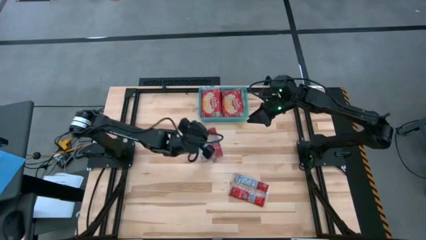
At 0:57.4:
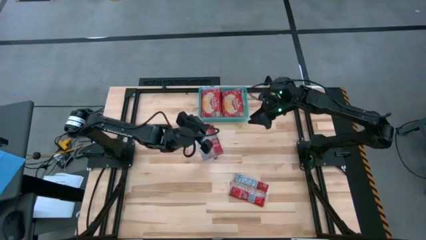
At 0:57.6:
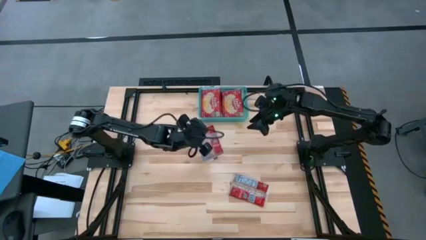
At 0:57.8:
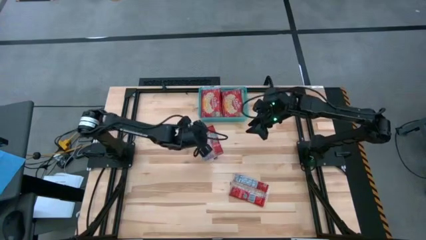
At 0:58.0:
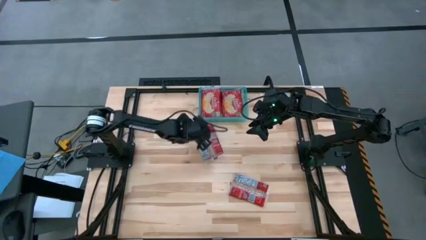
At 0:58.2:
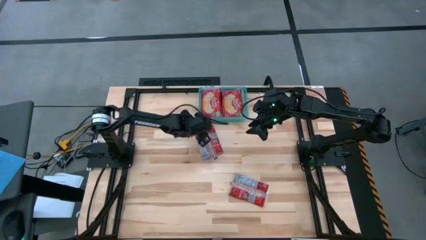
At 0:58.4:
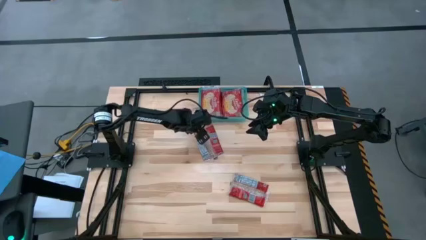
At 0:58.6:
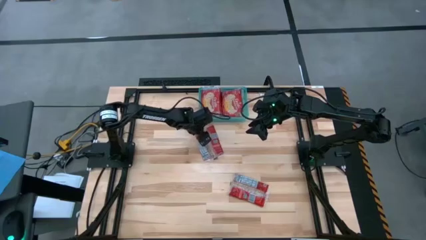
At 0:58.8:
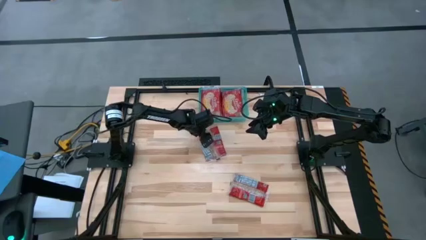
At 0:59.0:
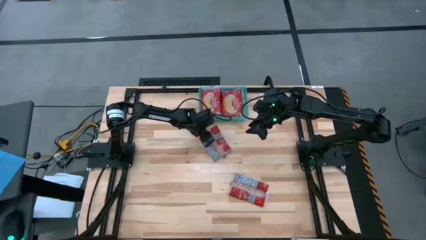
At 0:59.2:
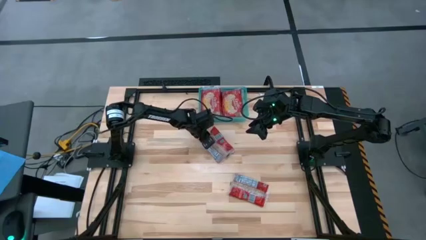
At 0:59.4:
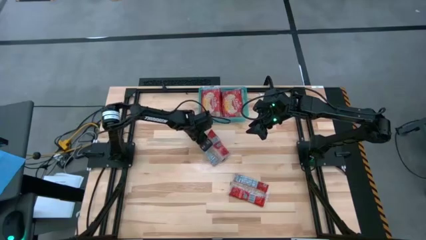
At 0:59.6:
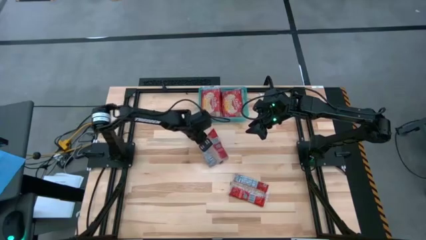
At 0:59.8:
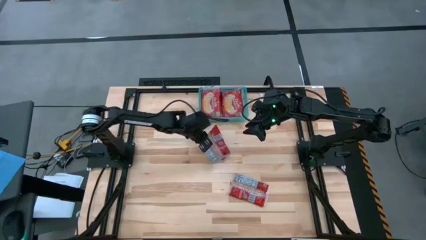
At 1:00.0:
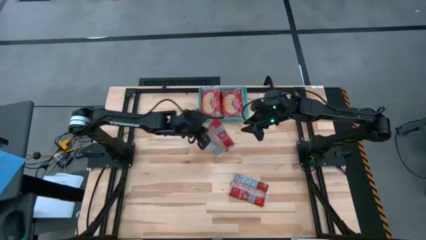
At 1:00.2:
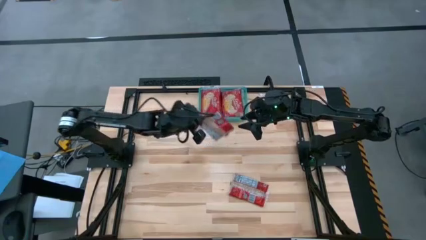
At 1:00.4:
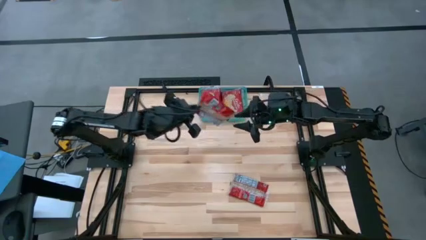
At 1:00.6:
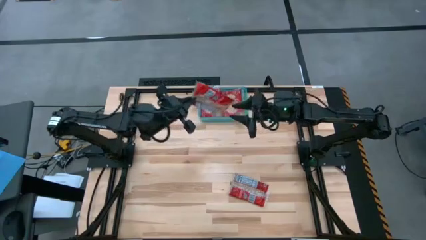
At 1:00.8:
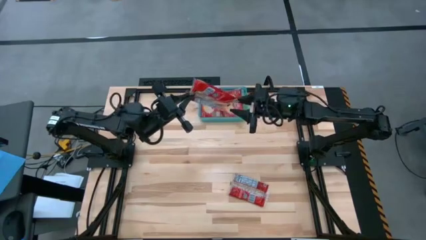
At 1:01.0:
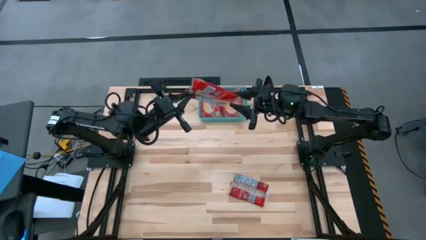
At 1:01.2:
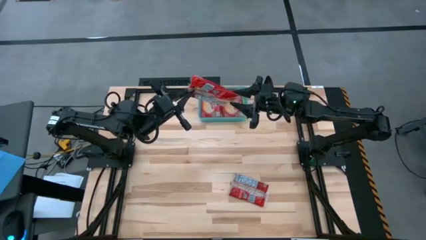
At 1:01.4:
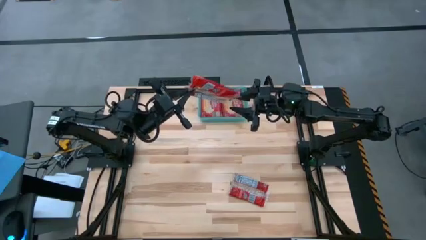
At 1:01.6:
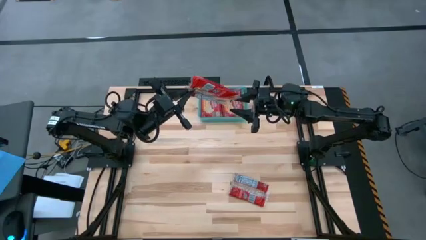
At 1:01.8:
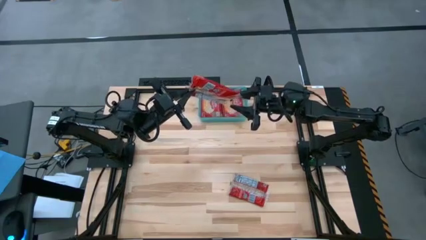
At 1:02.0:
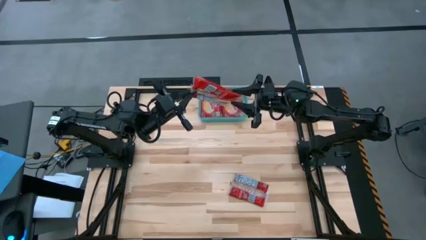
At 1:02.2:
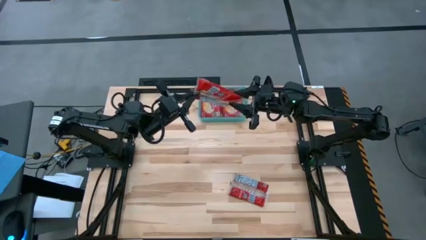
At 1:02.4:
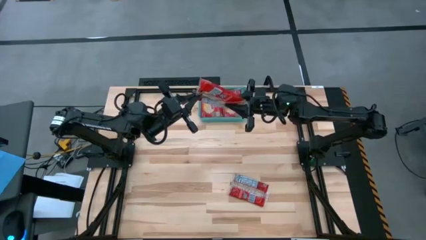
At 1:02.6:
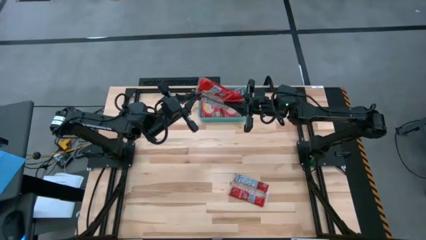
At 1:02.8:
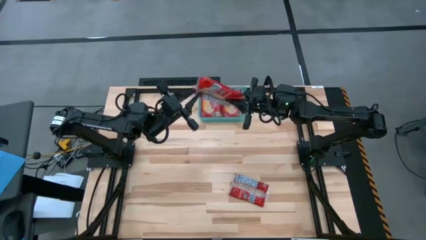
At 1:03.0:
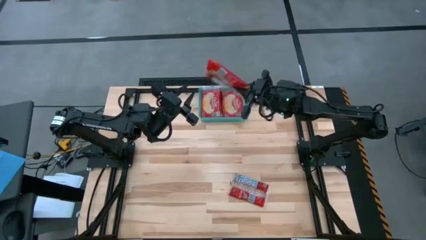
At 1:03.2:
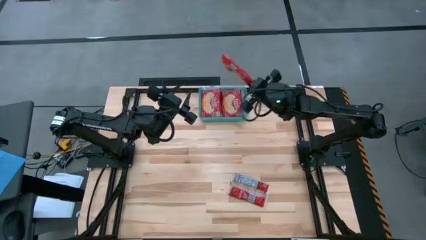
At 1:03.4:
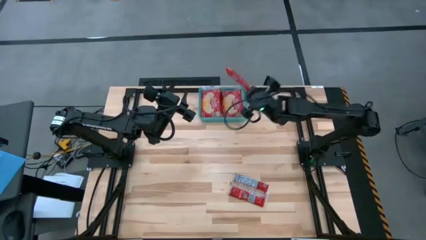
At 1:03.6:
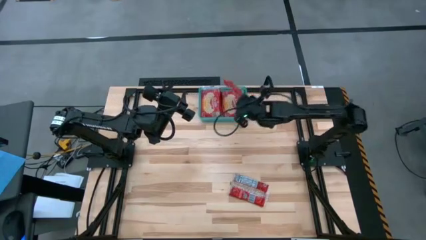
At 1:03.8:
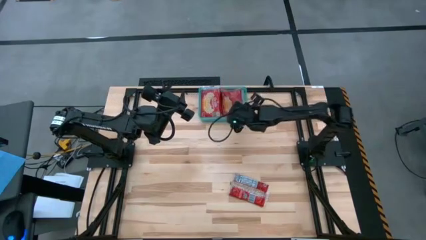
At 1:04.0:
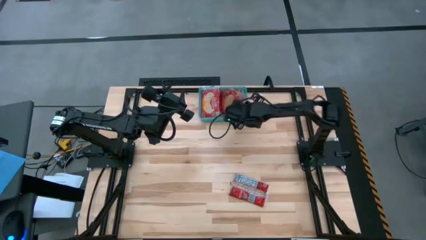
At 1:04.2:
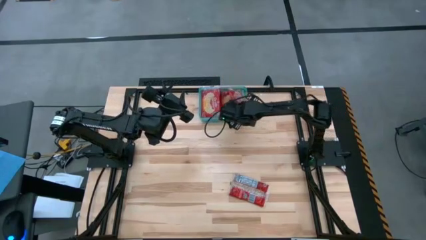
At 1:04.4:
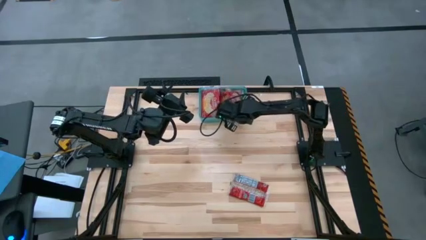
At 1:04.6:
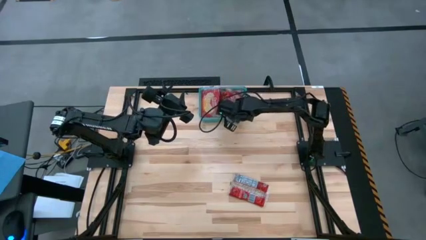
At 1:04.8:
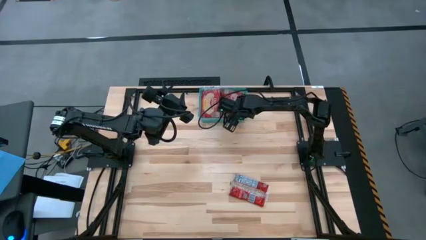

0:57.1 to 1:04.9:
Task: Sort popcorn bags into baskets
Put the top red popcorn bag into the green bin

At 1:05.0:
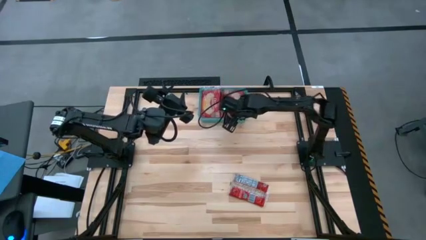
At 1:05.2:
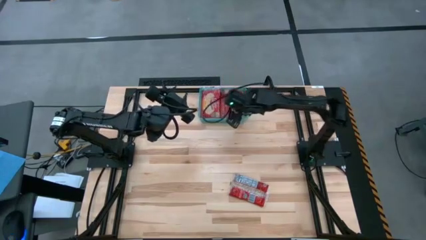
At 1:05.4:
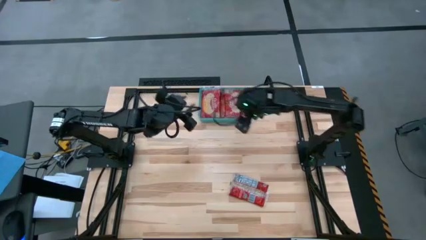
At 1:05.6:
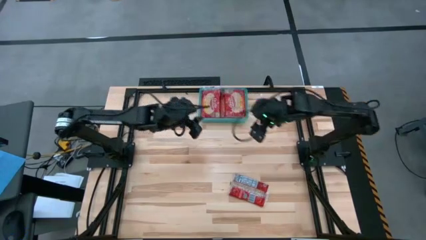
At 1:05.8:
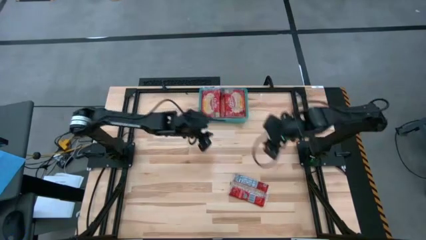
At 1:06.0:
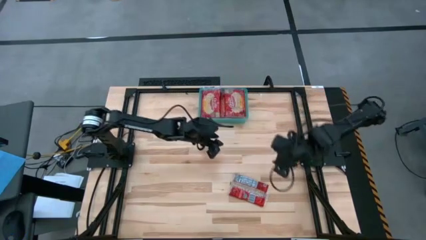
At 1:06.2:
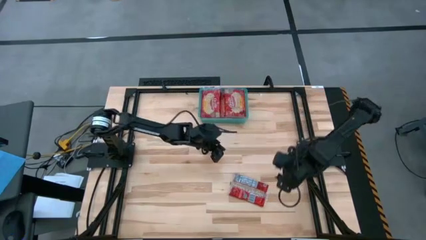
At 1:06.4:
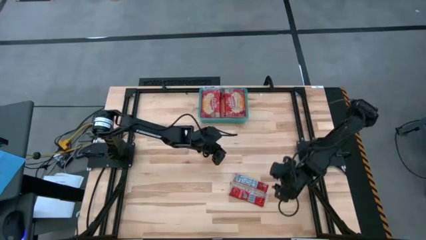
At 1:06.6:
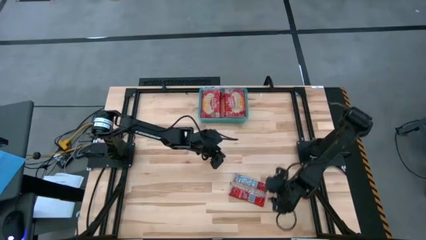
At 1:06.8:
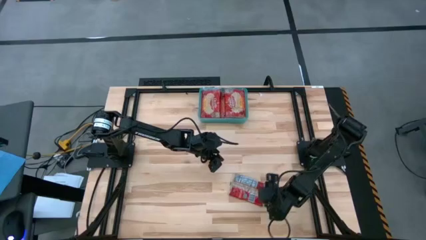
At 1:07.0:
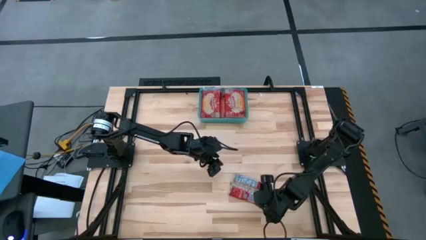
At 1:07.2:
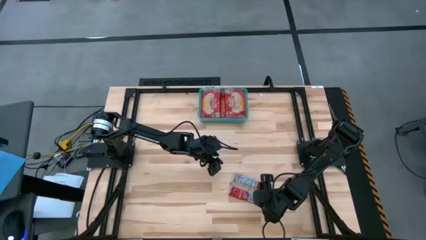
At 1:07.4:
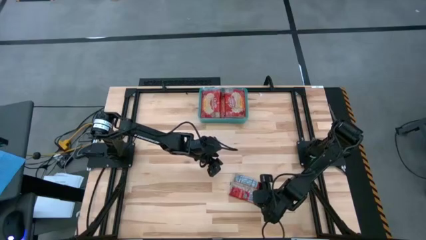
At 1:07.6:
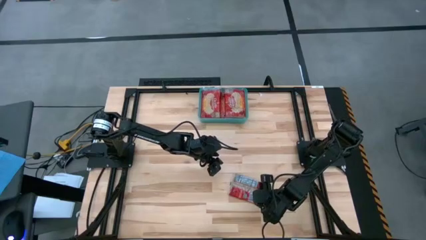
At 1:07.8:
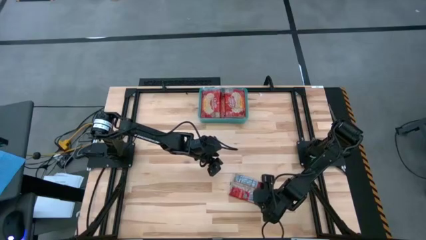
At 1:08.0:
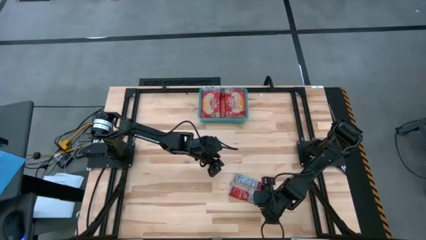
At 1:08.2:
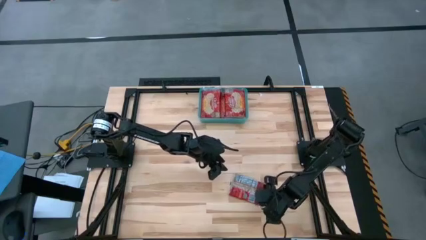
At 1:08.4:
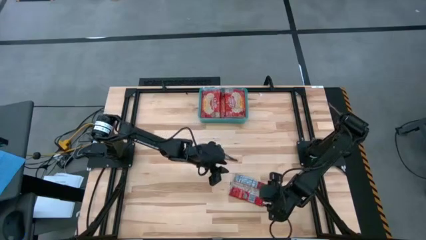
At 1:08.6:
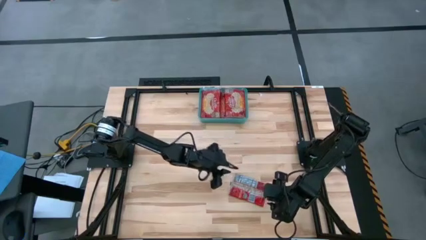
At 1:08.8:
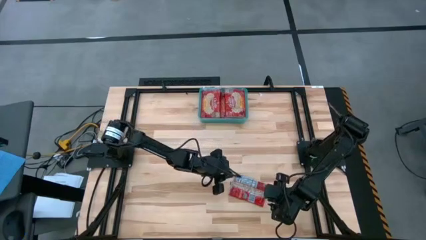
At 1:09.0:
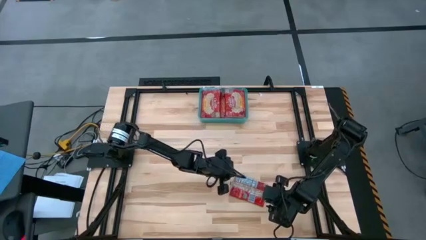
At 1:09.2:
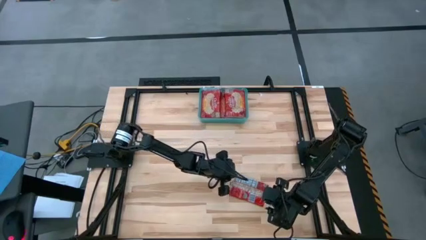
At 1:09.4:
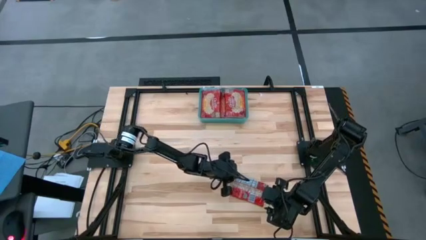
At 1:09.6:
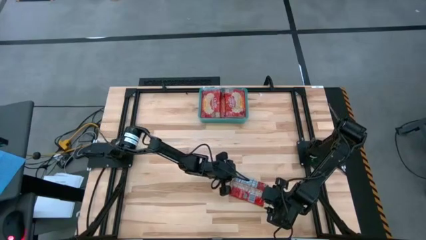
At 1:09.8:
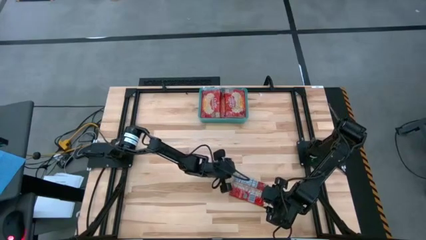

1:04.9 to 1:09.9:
Put the red popcorn bag into the green bin

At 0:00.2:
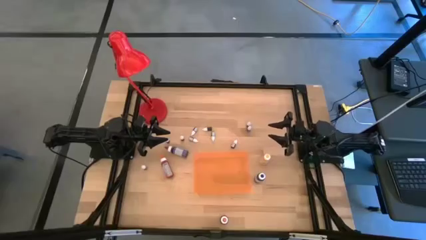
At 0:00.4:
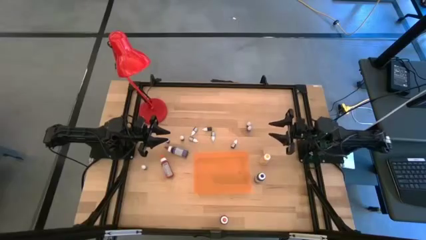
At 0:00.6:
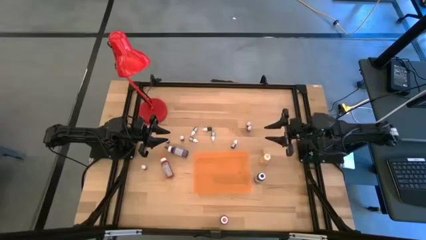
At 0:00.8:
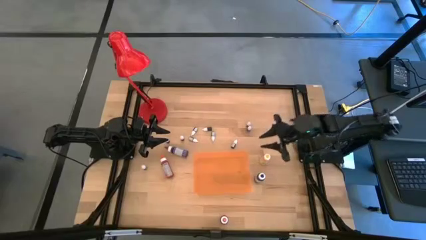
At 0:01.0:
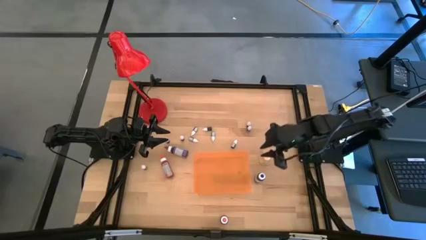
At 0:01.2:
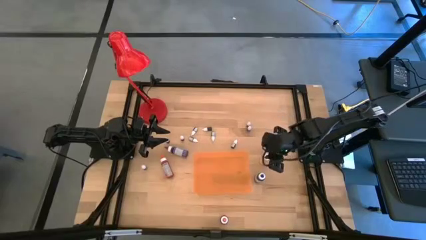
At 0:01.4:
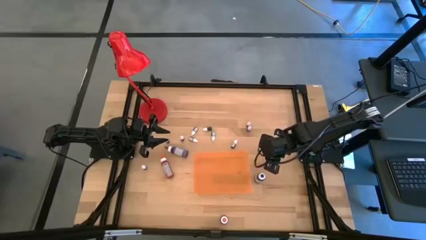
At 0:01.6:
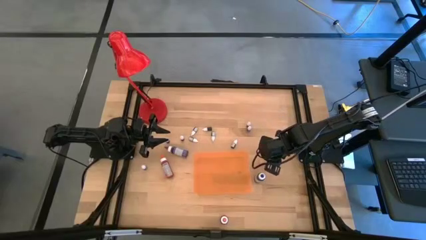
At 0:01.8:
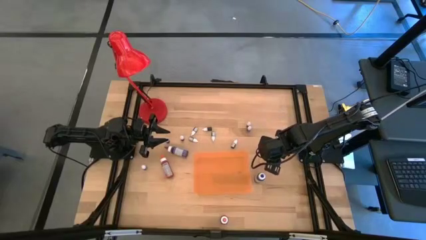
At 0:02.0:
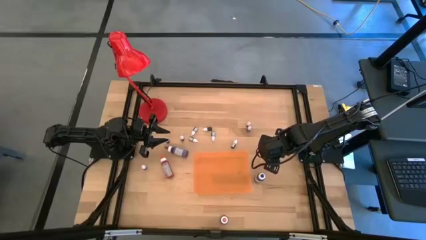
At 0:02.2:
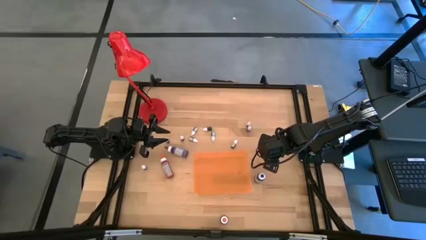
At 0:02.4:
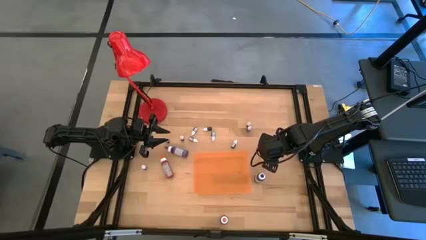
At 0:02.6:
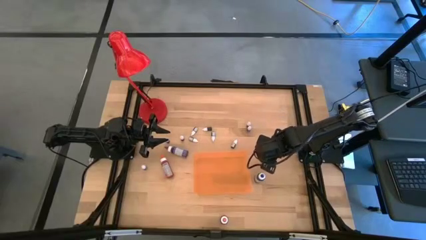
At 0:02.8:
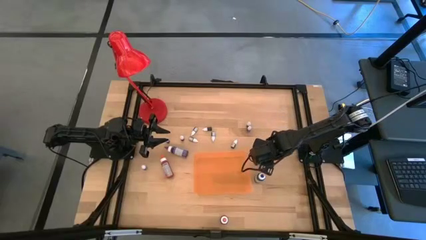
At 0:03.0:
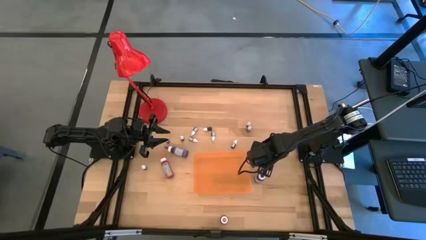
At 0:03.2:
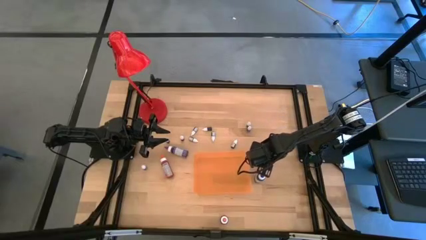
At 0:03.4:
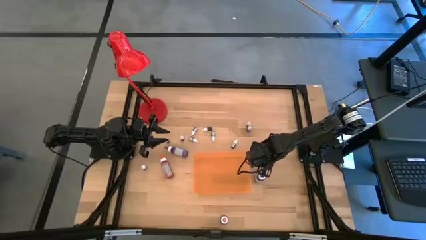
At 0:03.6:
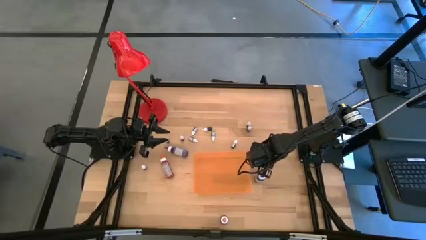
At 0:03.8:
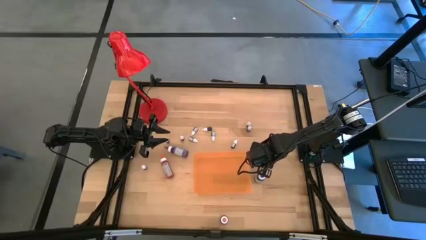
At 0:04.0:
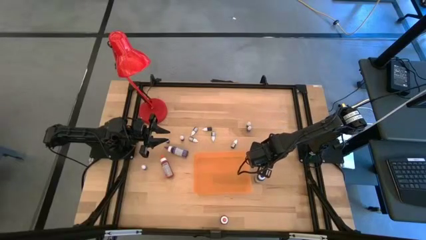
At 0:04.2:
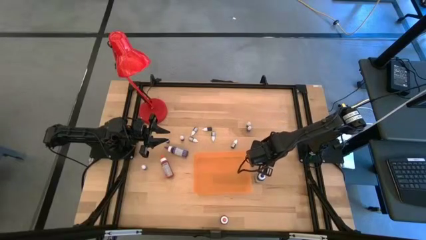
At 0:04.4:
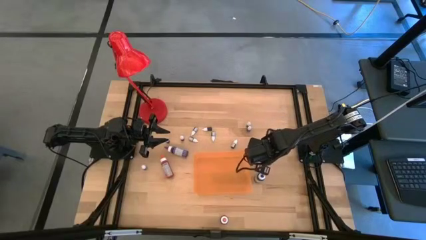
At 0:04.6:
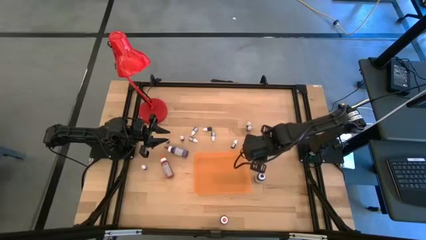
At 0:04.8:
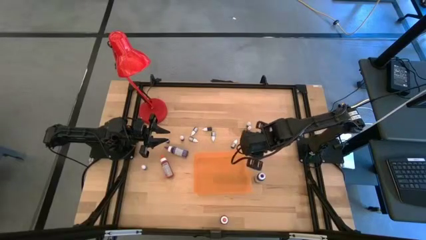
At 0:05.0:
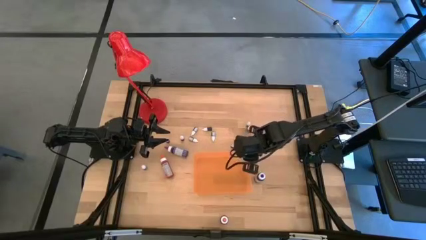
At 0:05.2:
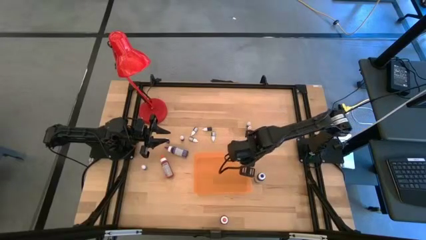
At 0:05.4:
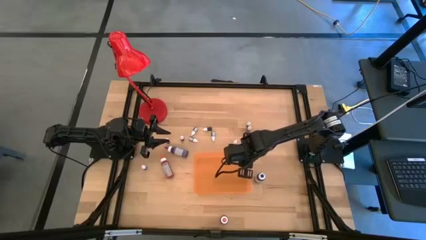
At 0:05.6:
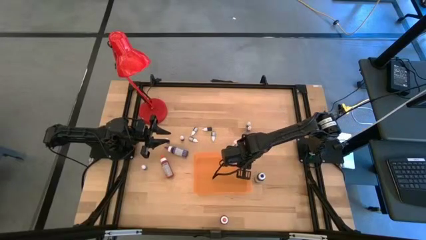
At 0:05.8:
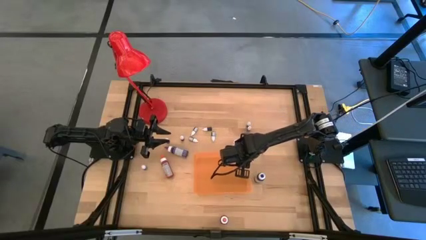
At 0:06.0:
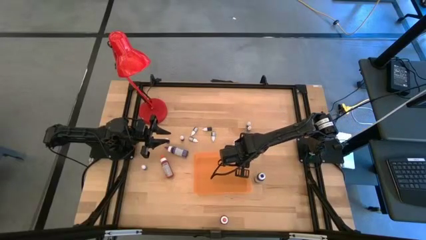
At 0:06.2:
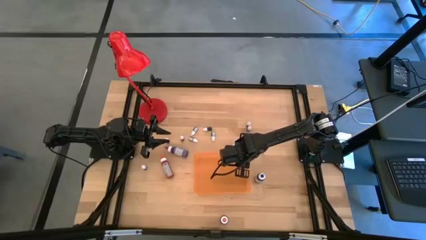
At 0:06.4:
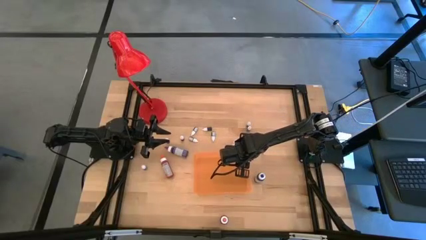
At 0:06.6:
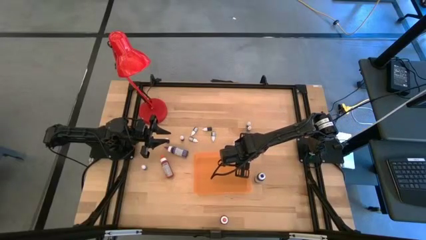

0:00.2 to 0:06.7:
Task: Pick & Place food coloring
Put the big yellow food coloring bottle into the orange bin
